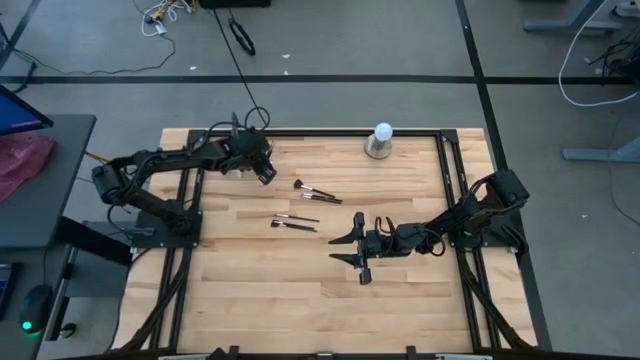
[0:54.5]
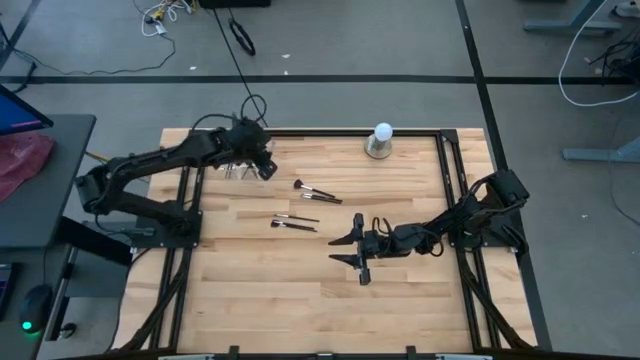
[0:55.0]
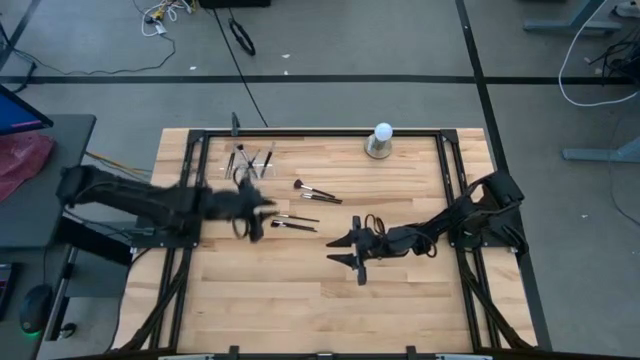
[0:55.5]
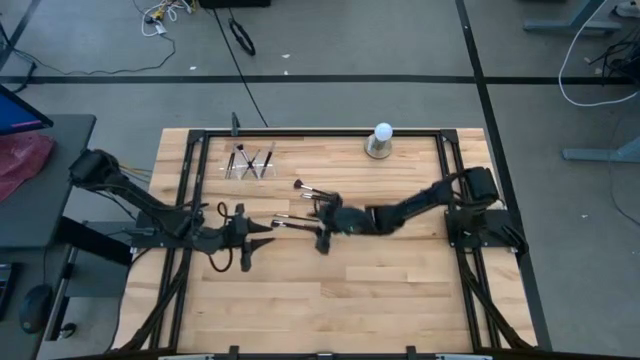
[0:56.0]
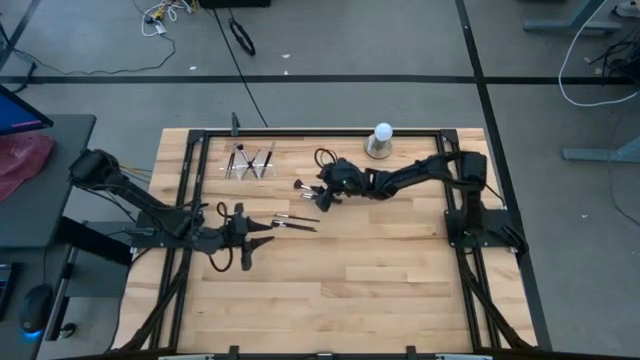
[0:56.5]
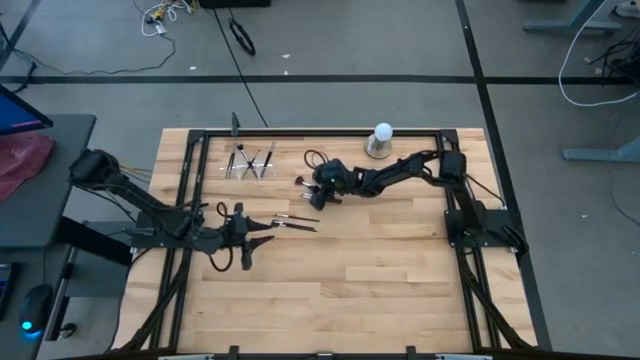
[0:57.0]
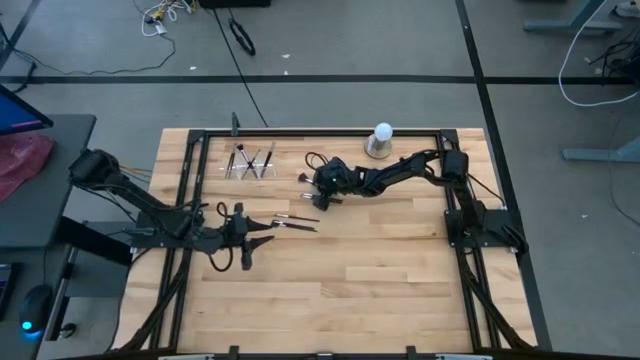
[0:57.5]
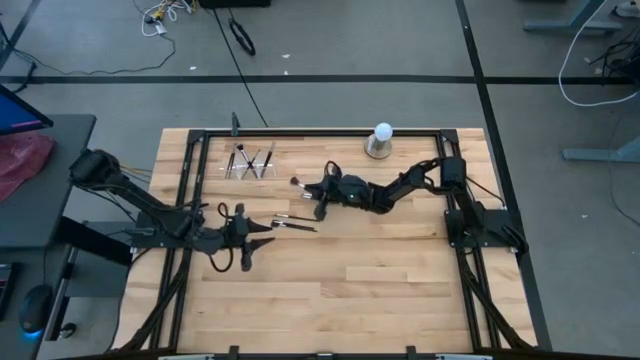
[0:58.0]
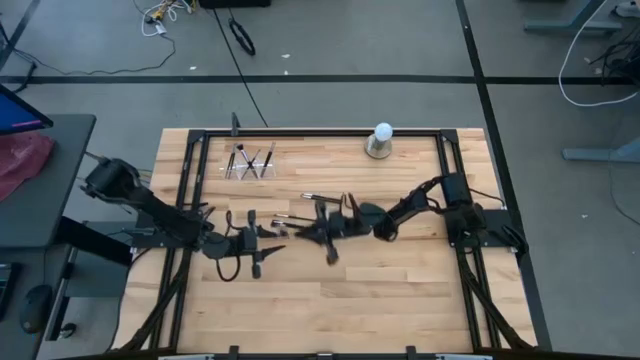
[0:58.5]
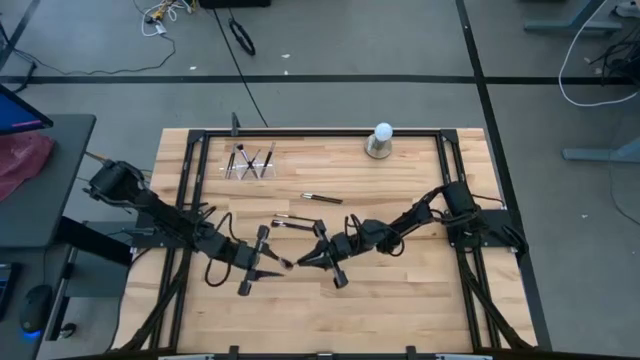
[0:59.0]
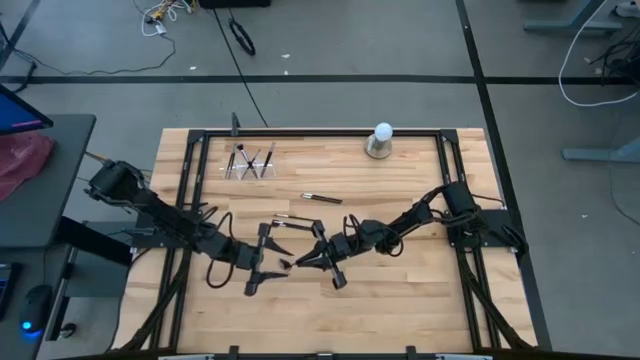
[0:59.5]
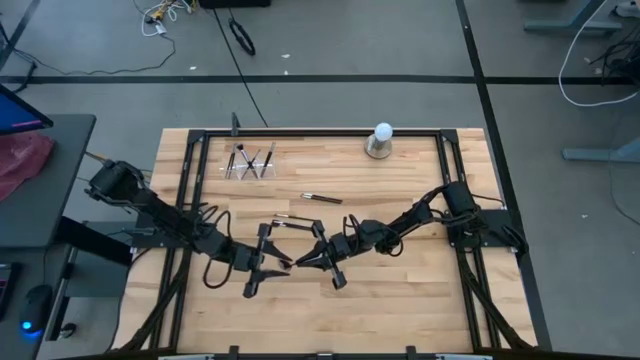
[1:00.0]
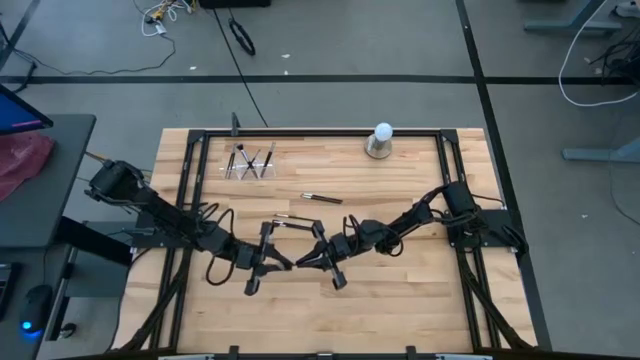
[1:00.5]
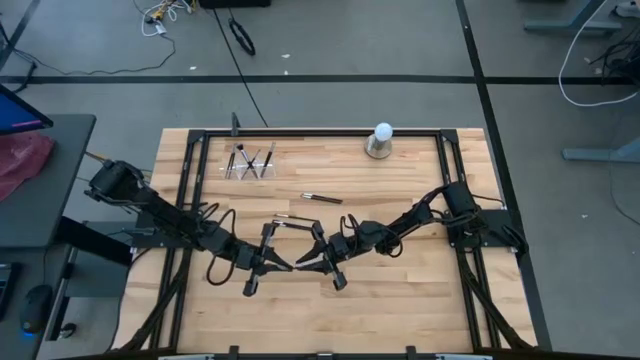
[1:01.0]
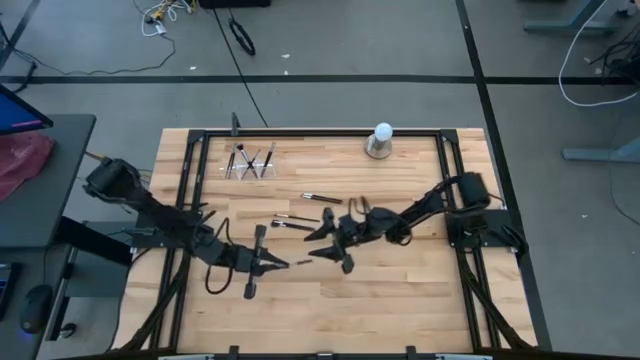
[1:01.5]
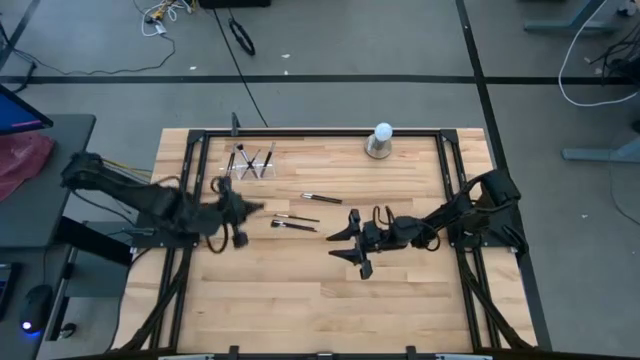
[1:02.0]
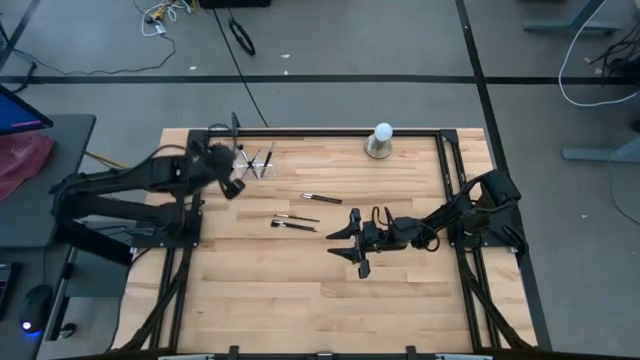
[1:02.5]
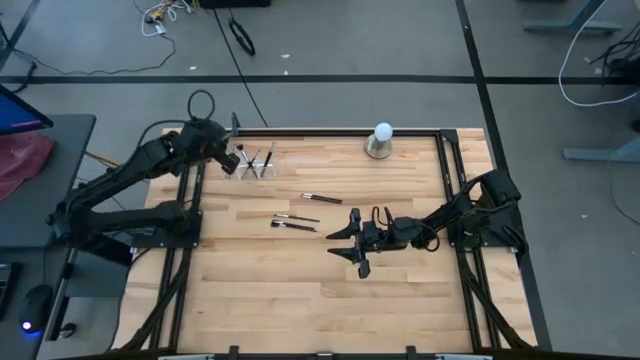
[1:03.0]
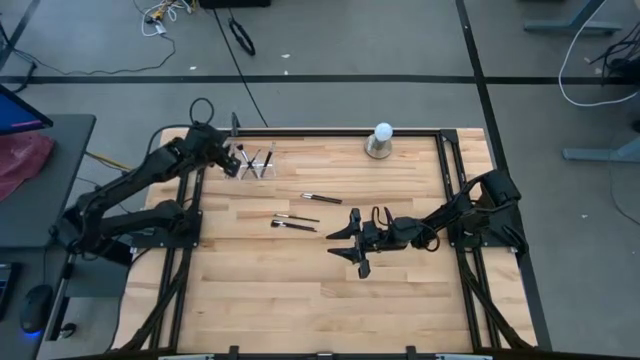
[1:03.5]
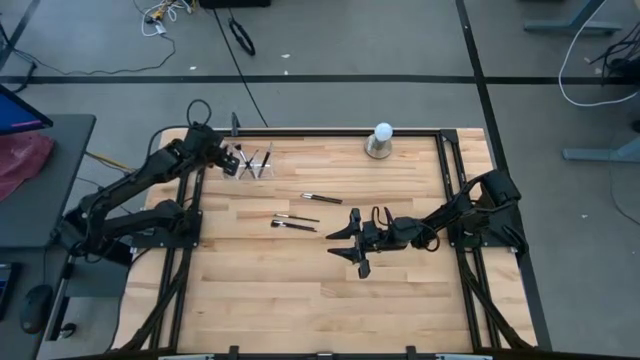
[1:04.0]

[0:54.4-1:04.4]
Task: Put items in baskets/containers
Put the highlighter brush into the transparent organizer

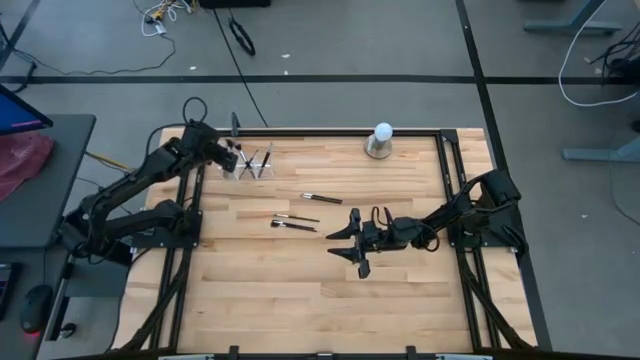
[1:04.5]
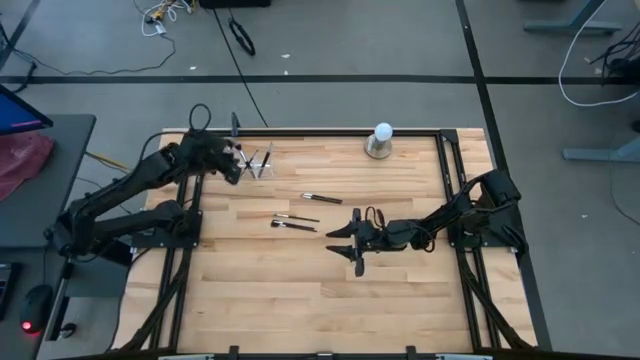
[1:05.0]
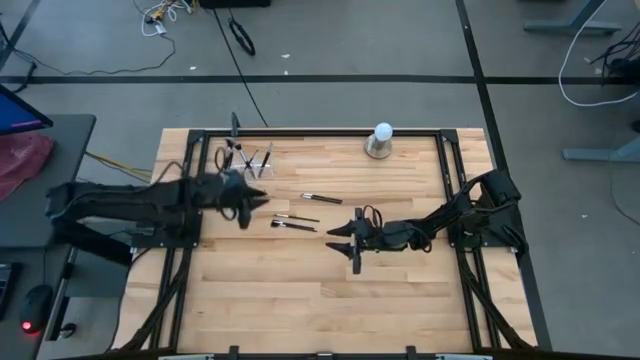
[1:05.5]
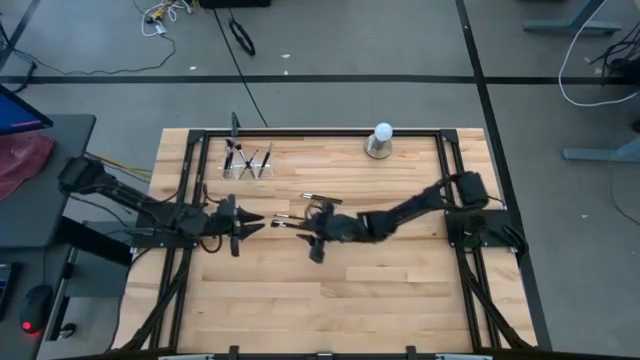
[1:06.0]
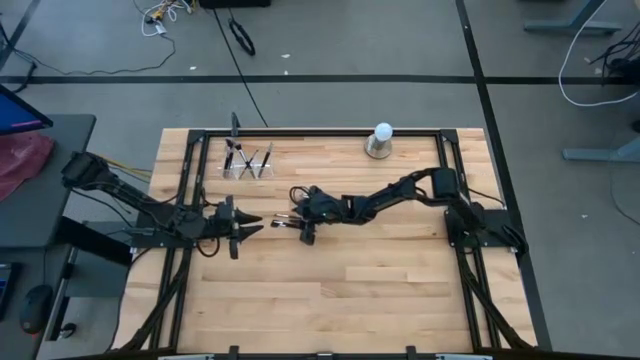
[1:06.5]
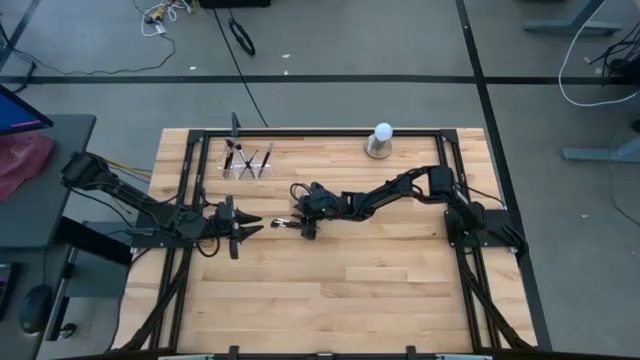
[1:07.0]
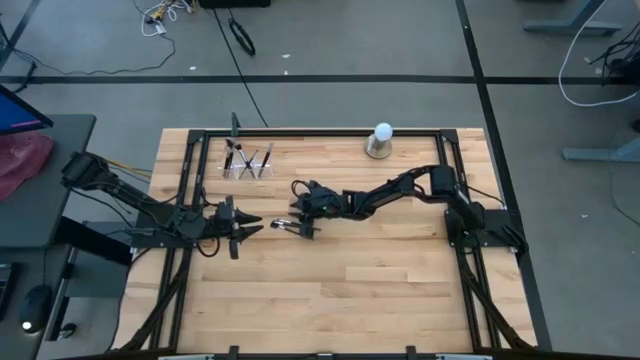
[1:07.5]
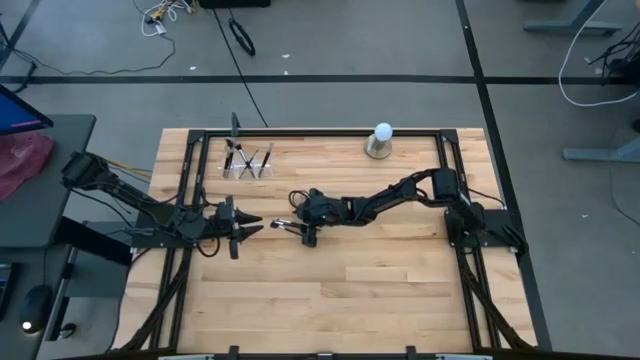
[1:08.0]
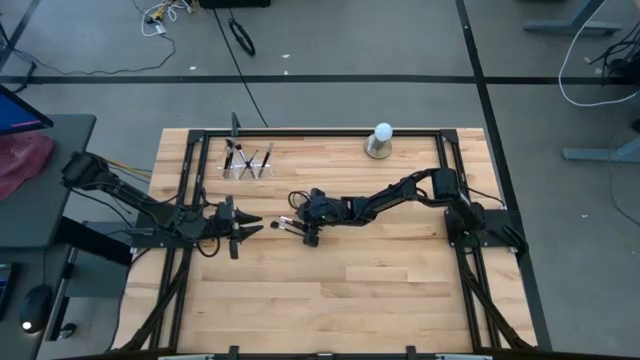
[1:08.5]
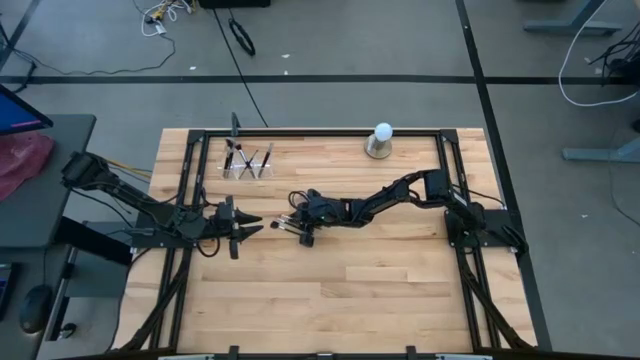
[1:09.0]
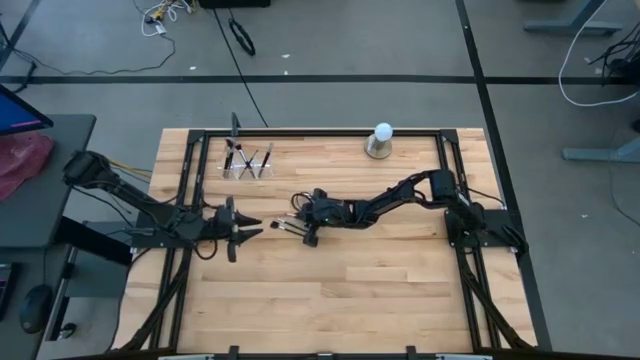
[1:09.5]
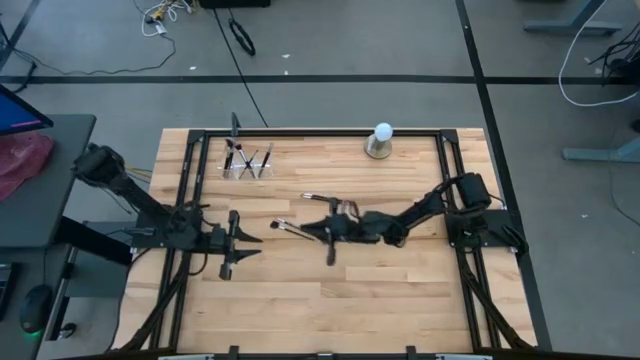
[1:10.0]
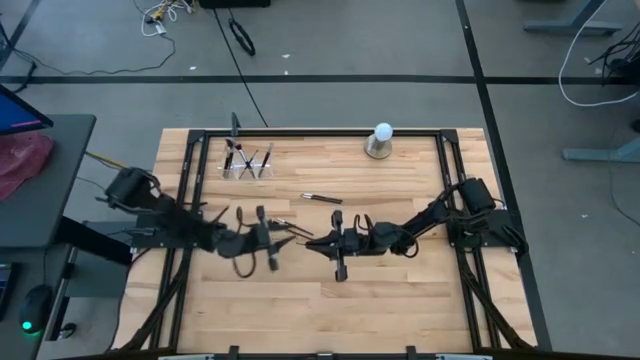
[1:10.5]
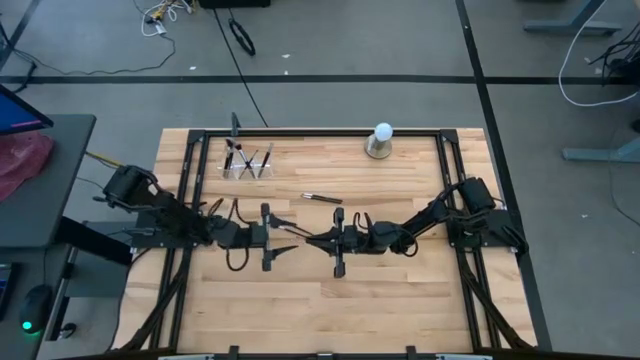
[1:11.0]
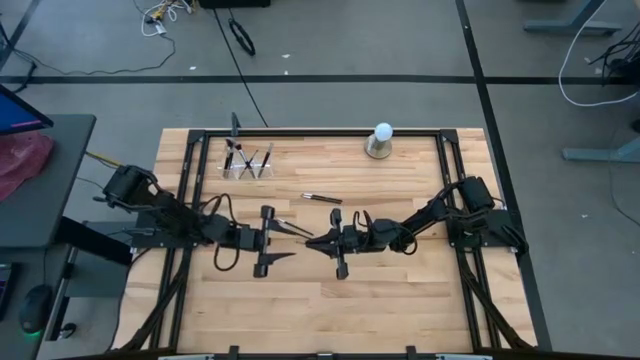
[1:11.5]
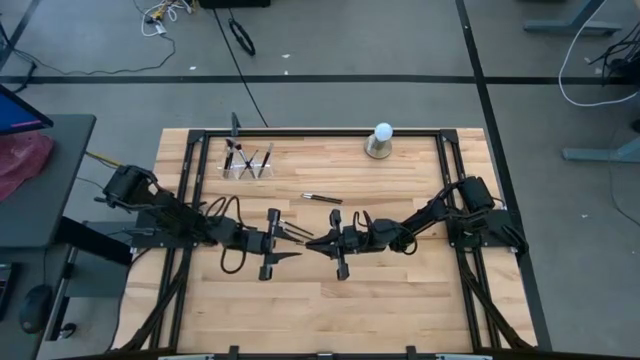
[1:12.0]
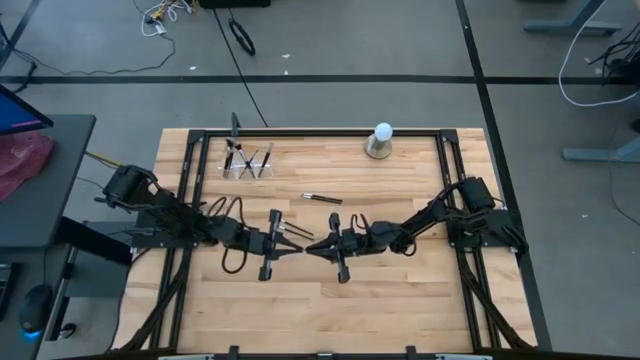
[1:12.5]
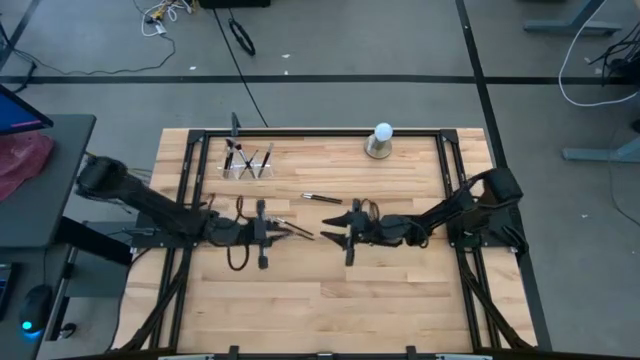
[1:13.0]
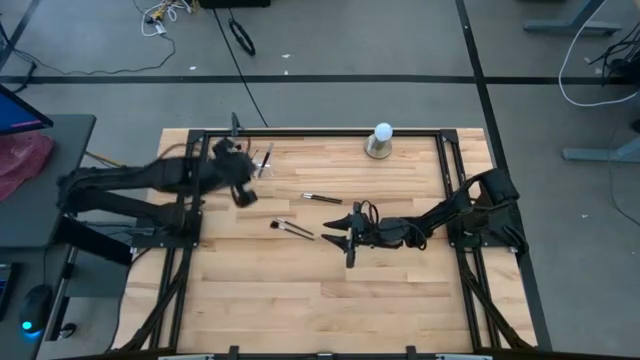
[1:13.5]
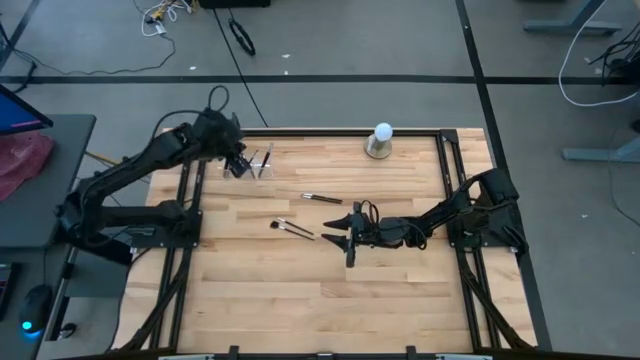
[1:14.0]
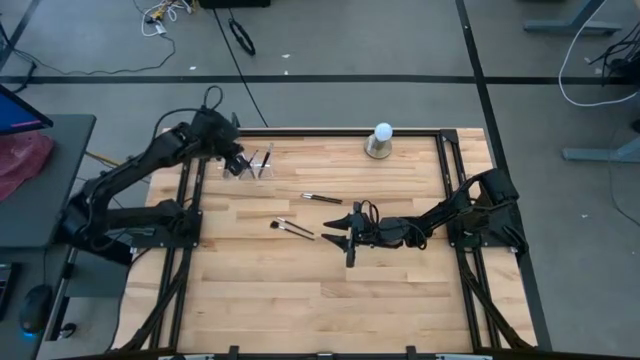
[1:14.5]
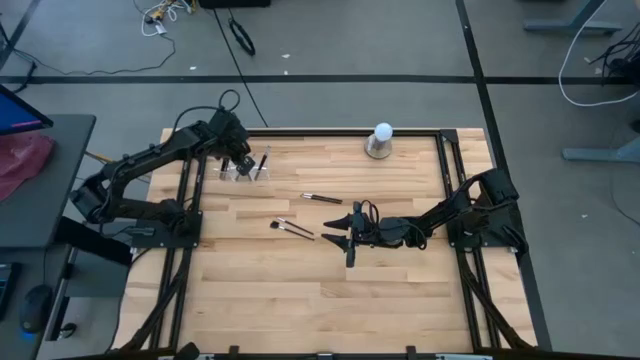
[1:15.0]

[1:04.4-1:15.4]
Put the eyeshadow brush into the transparent organizer
